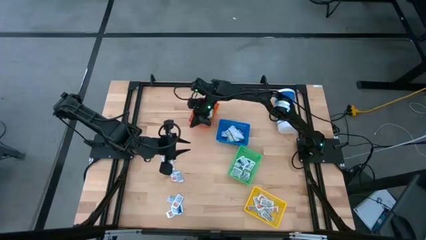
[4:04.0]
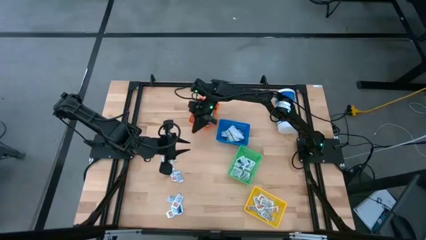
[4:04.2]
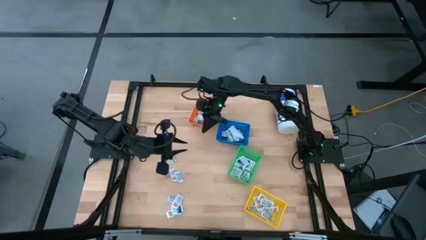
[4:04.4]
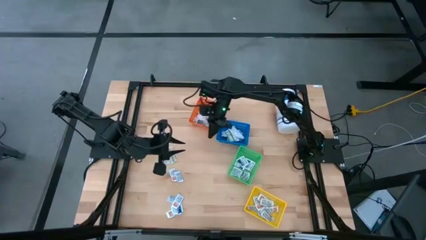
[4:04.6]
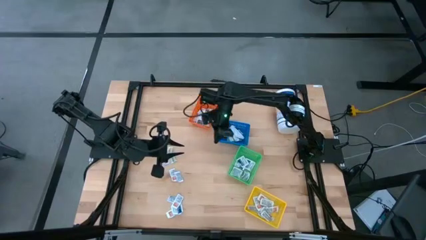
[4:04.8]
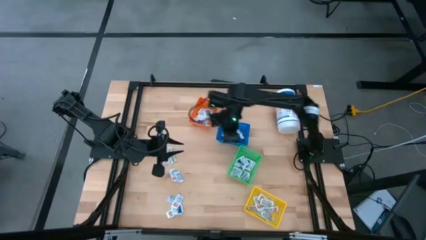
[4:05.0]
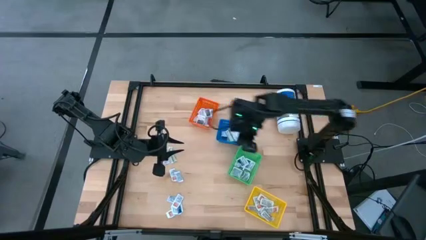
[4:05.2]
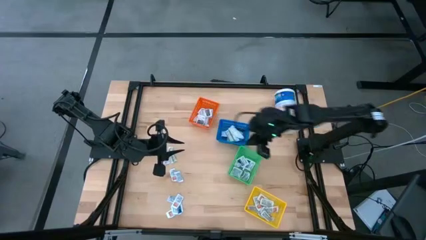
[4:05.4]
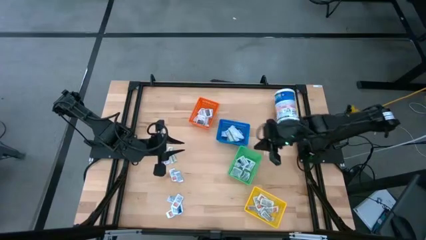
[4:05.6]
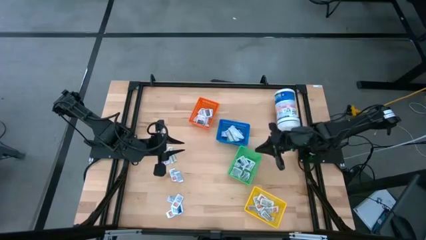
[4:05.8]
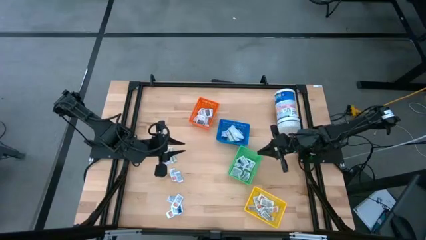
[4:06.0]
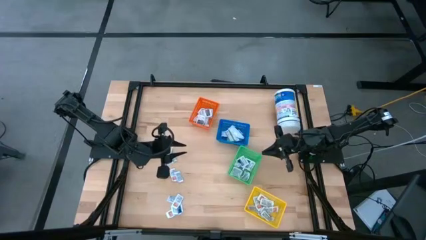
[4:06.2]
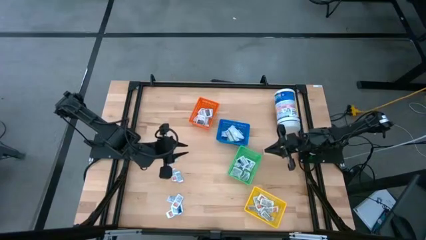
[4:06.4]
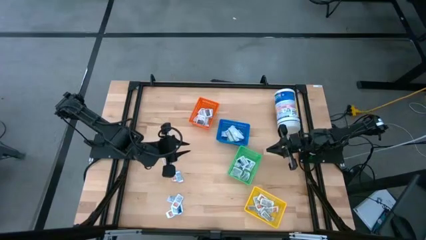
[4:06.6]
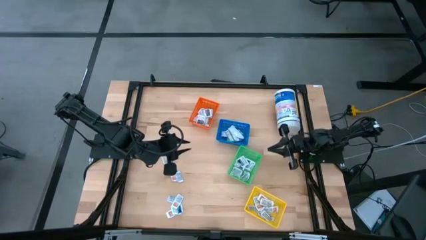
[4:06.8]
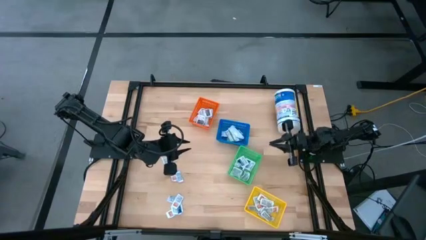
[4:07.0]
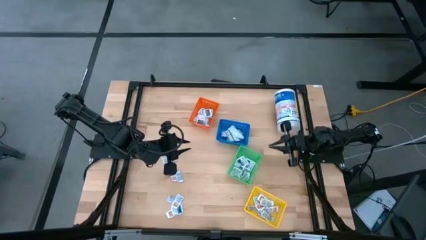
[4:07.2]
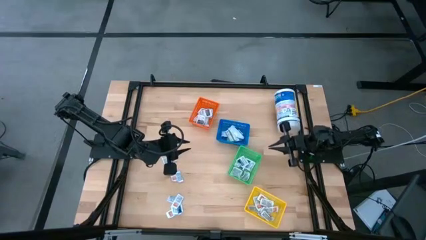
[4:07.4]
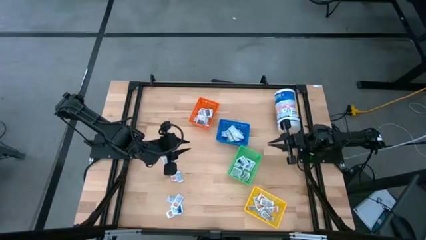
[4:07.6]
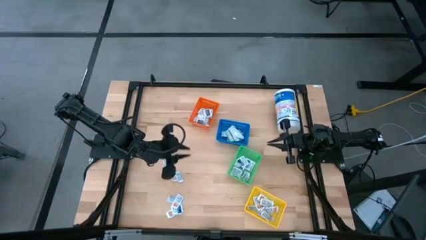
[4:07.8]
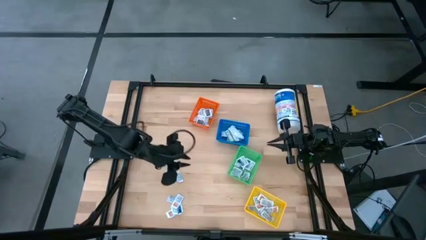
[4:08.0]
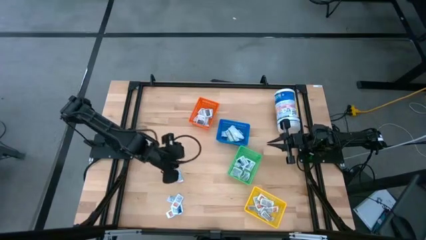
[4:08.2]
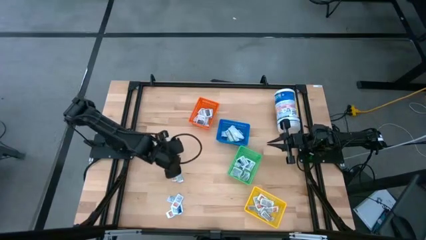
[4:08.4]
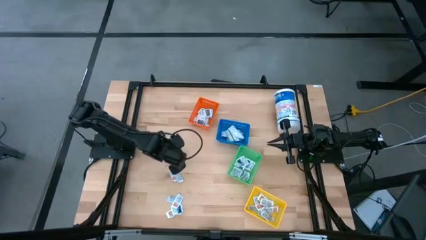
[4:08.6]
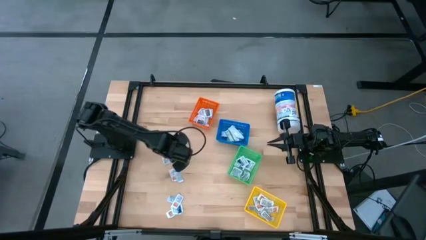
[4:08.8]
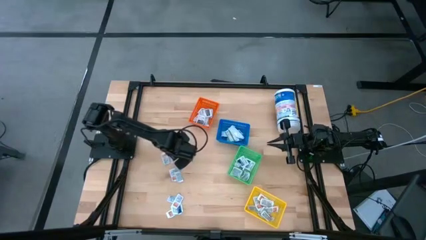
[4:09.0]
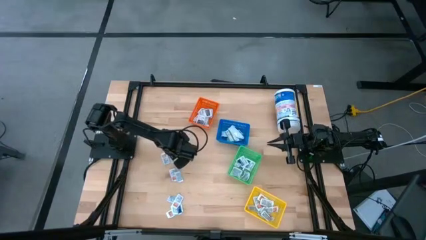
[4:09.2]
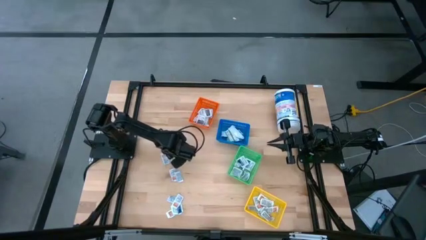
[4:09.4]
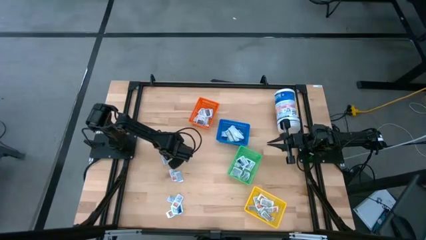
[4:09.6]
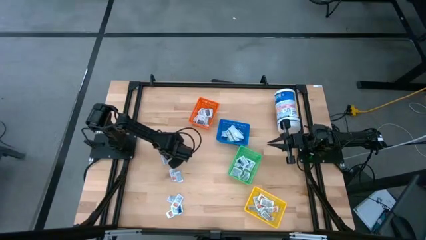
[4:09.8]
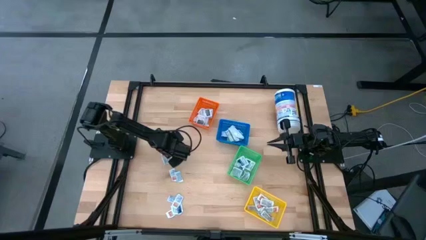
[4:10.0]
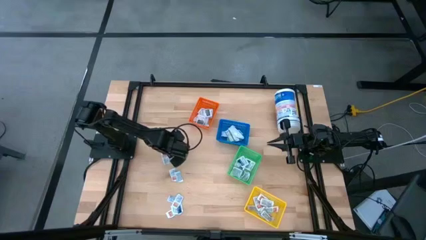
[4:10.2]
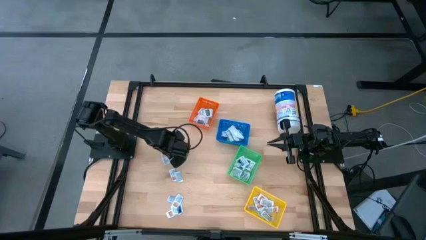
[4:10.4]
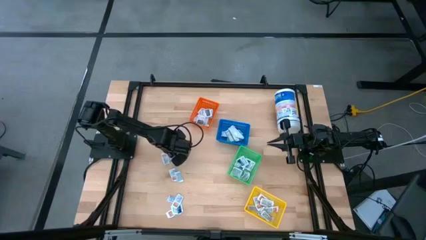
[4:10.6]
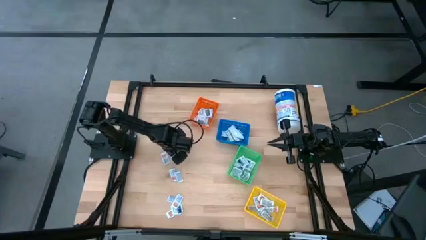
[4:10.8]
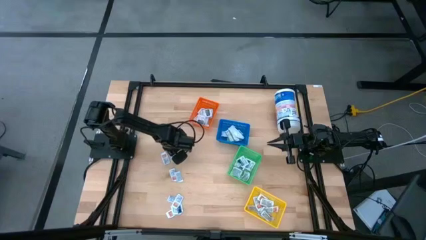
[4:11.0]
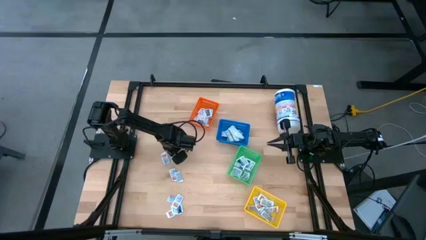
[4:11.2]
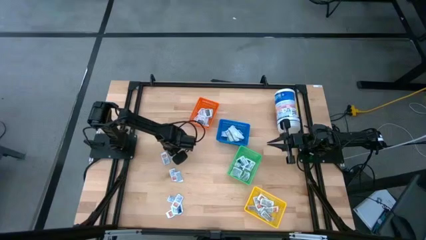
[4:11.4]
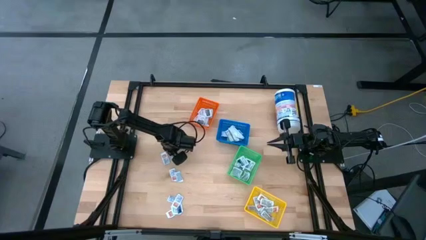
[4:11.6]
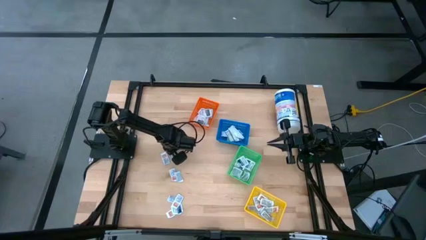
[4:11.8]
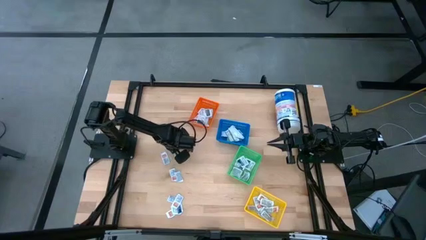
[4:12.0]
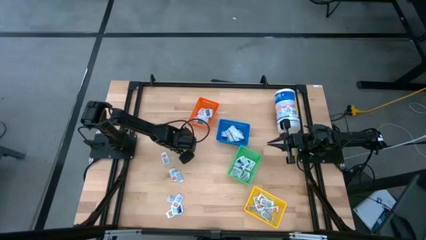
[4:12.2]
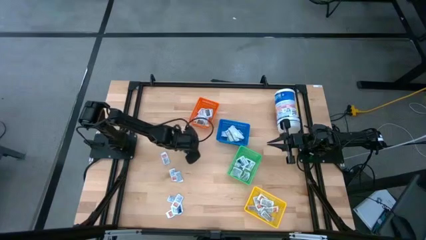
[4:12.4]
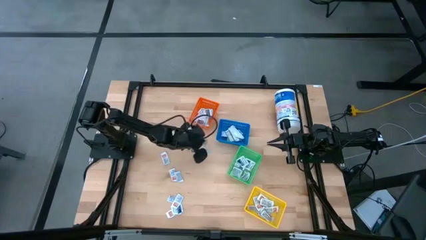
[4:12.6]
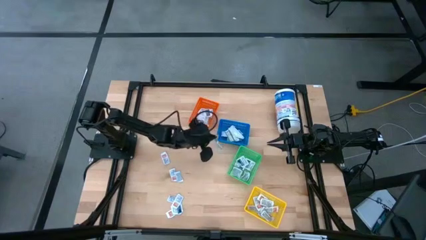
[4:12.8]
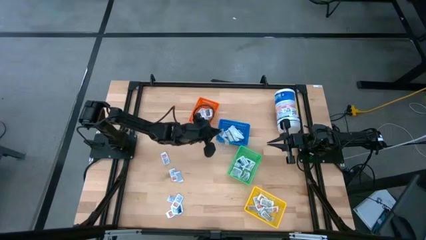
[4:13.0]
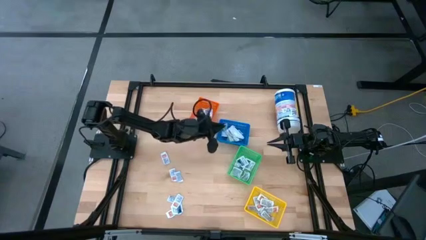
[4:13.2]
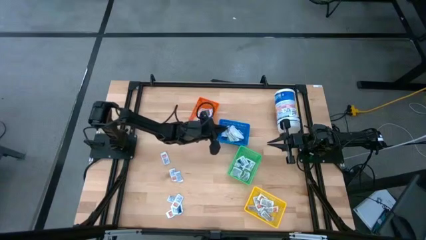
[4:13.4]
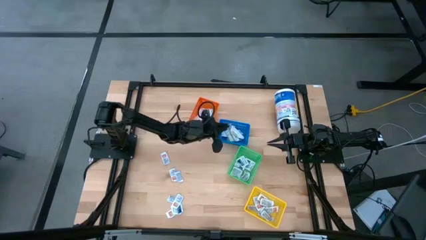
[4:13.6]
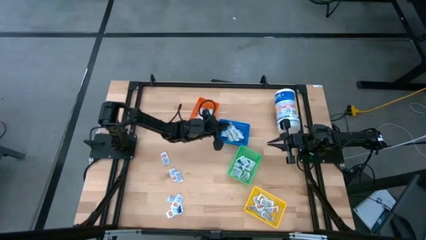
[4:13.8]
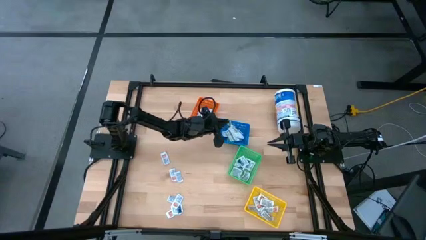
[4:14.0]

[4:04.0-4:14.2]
Task: Pick & Place First Aid Supplies
Put the green bandage pack into the blue basket

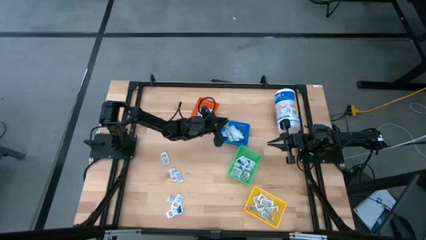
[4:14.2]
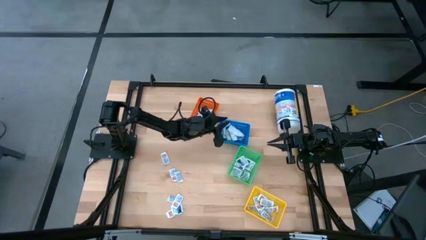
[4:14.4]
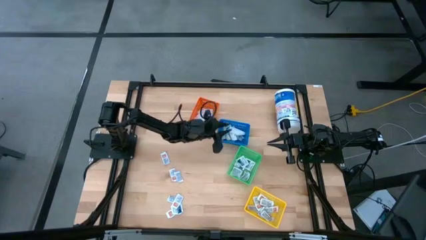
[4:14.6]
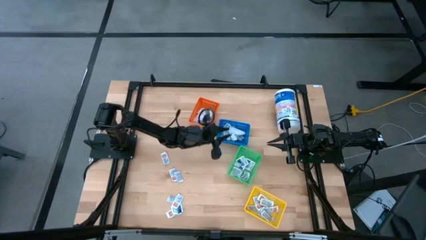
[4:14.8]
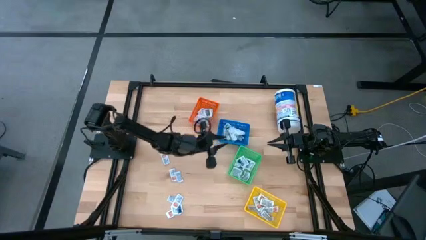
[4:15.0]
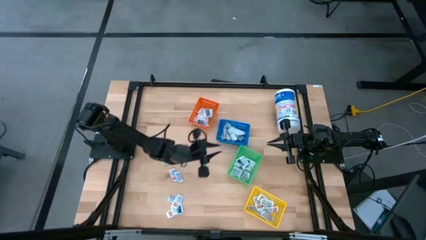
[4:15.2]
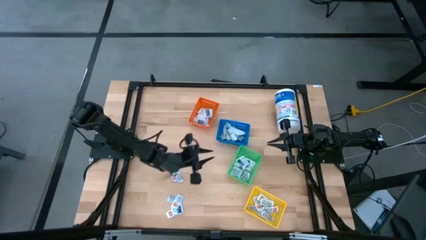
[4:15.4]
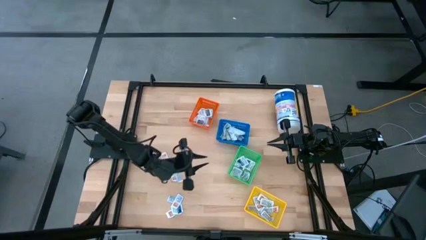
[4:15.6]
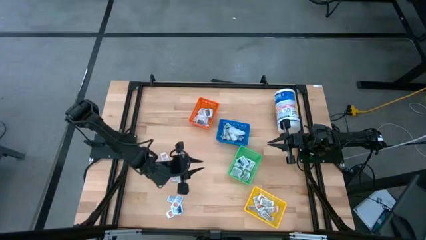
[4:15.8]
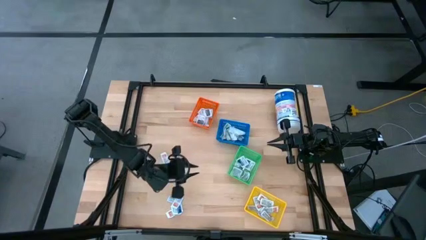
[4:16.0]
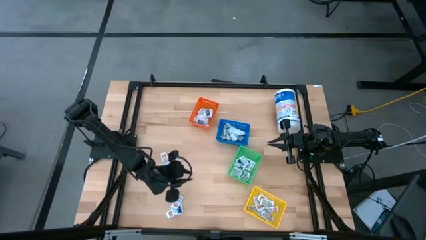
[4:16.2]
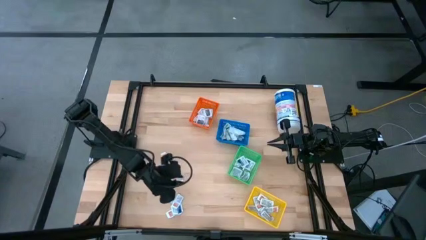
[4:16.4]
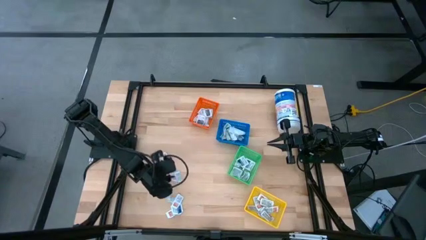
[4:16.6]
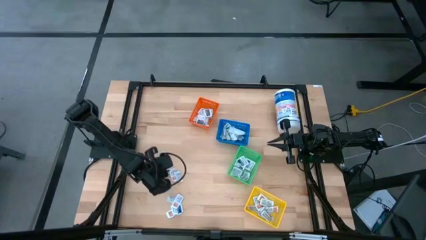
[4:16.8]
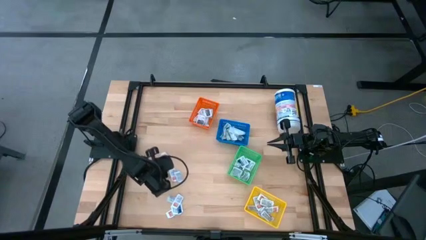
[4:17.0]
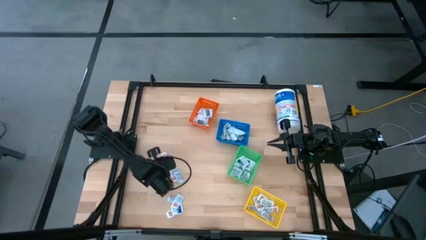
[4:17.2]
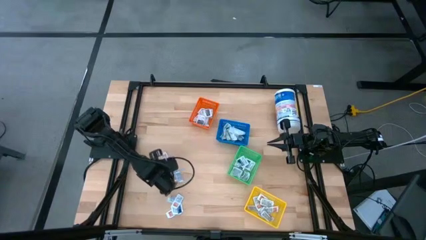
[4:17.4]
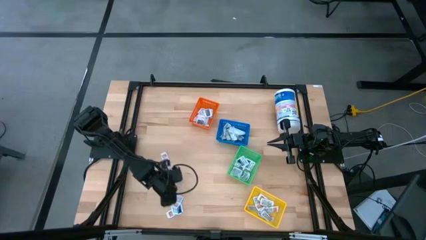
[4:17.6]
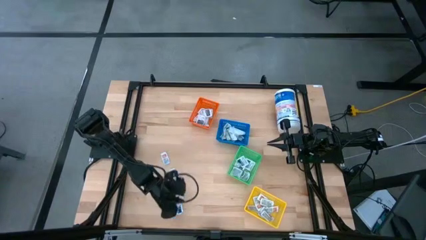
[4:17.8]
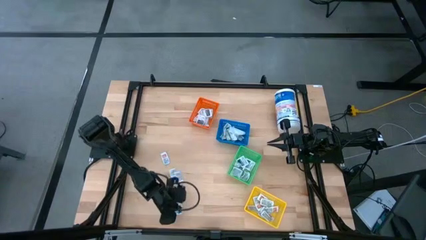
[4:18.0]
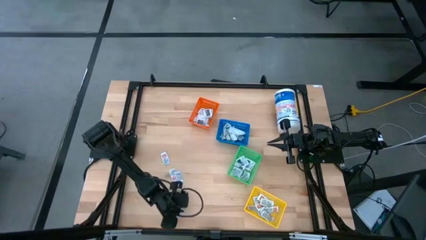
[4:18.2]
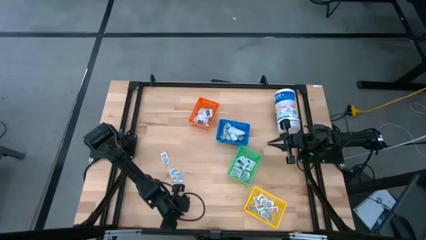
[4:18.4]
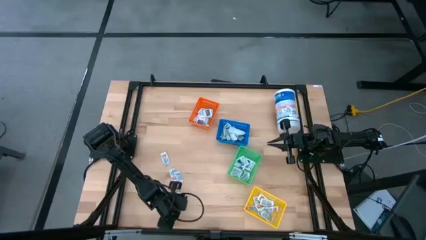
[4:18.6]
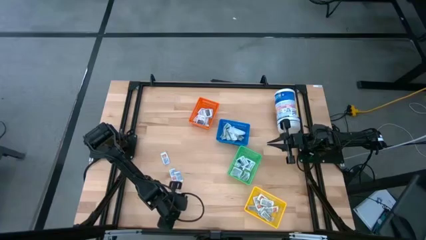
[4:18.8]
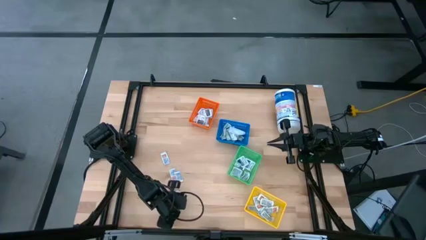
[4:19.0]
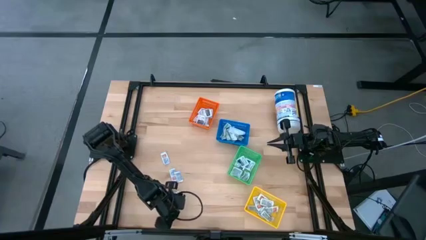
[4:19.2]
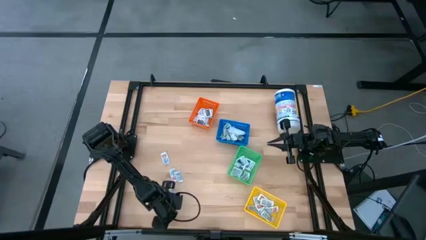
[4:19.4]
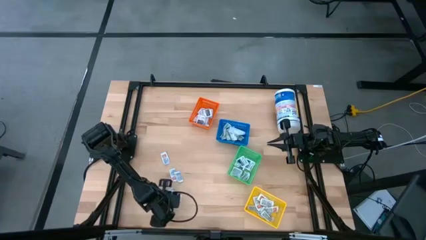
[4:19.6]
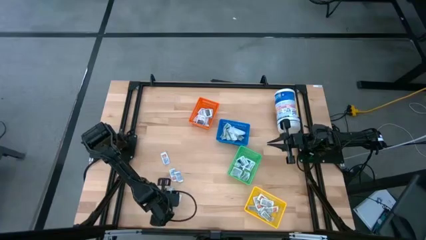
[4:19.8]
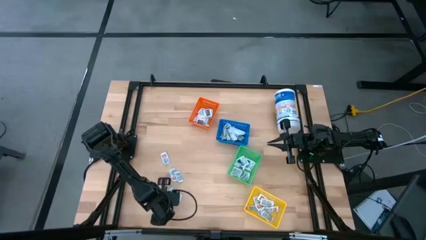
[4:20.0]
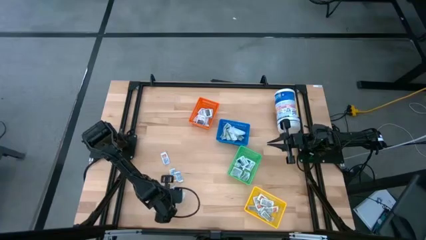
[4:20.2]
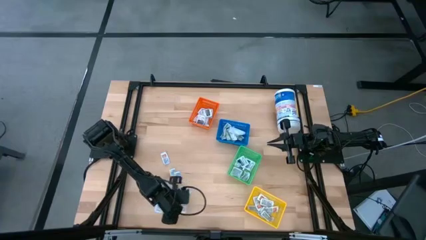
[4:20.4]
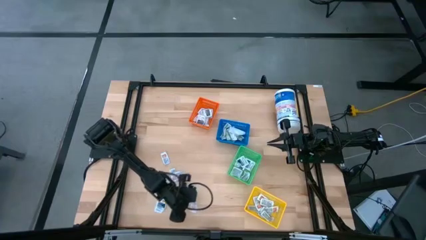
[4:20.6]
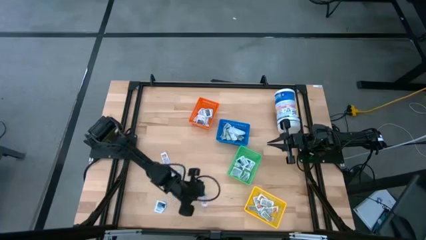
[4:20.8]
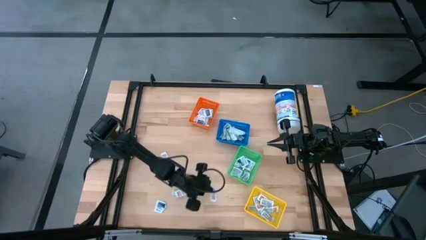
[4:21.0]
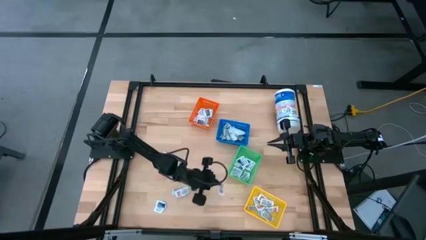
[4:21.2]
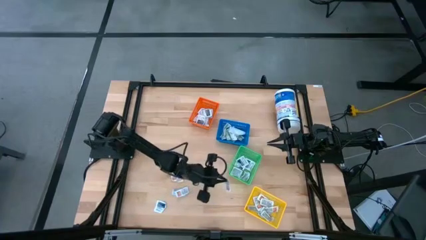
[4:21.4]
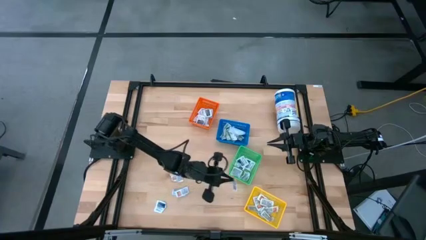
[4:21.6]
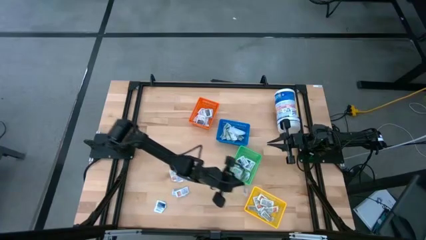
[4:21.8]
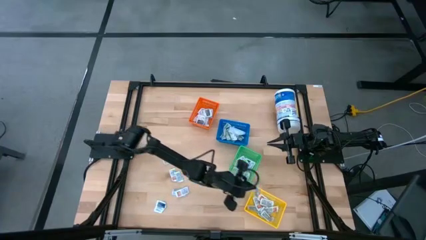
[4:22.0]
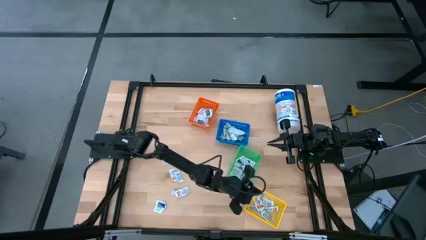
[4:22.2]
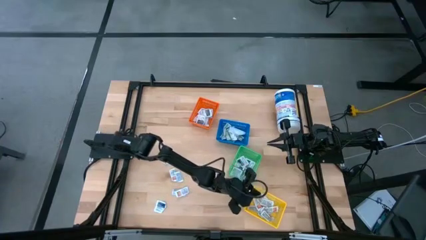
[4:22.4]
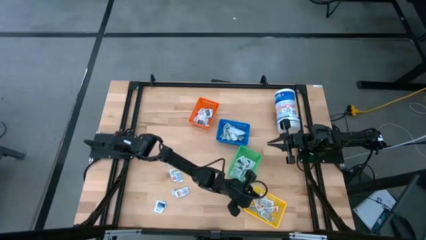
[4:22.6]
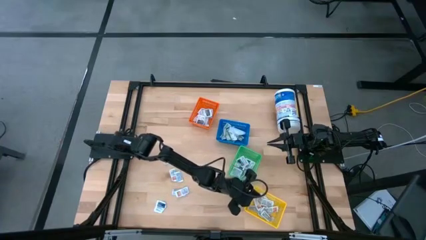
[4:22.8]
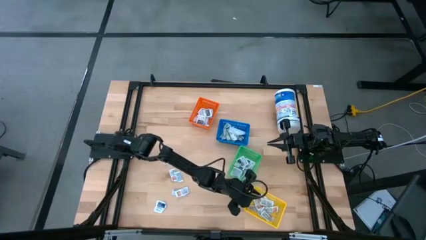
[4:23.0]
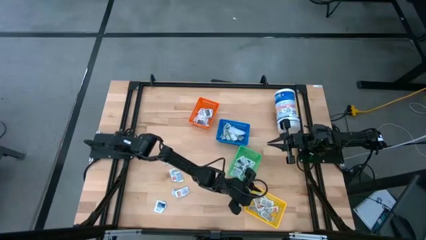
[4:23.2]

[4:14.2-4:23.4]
Put the orange ointment pack into the yellow basket
